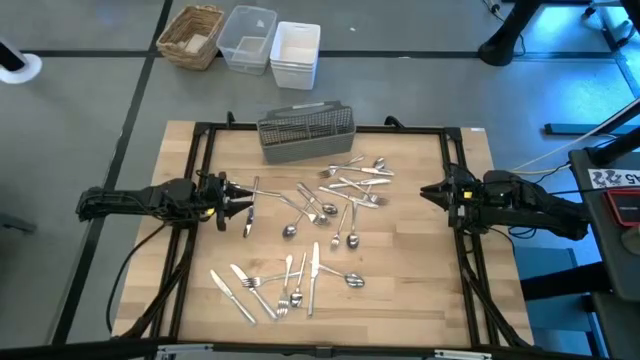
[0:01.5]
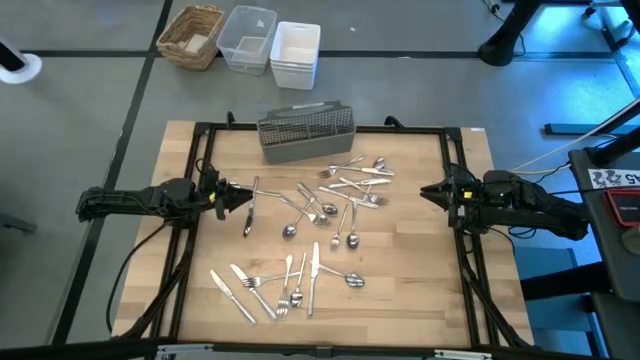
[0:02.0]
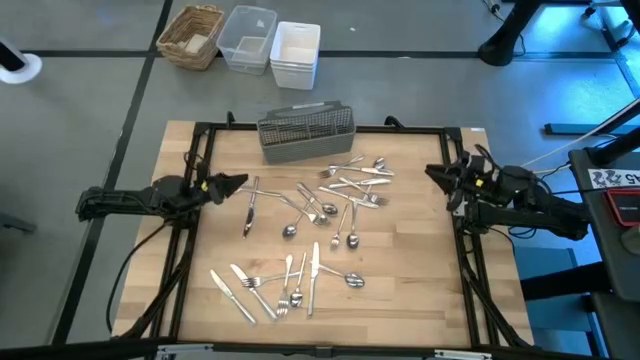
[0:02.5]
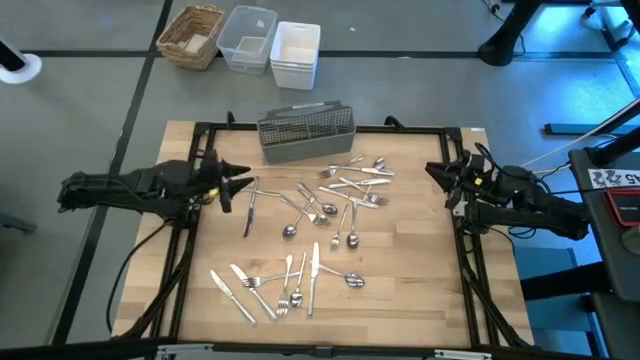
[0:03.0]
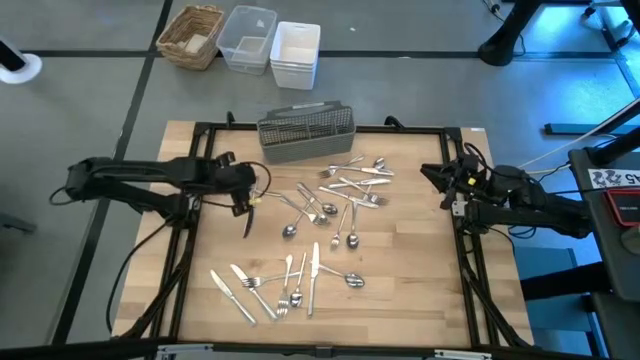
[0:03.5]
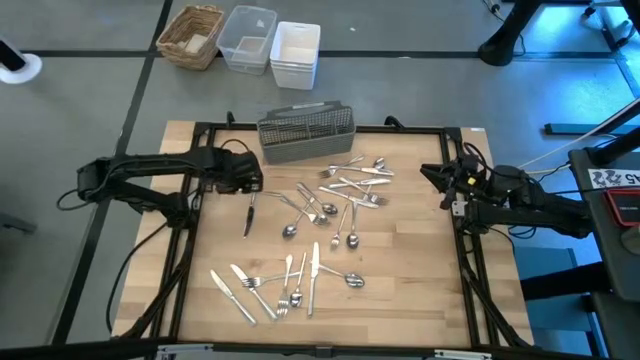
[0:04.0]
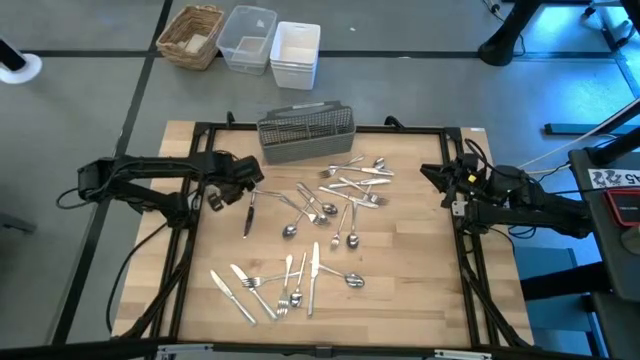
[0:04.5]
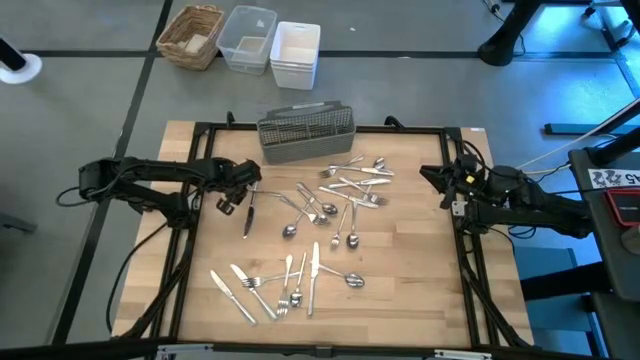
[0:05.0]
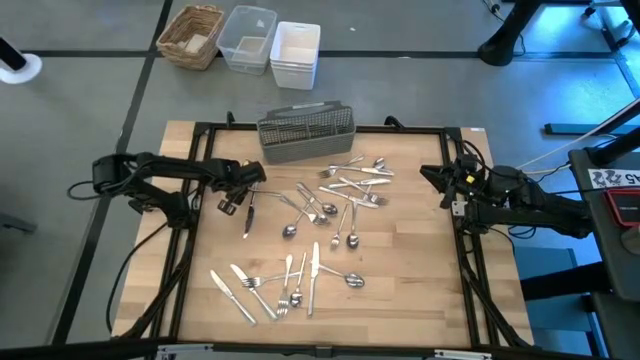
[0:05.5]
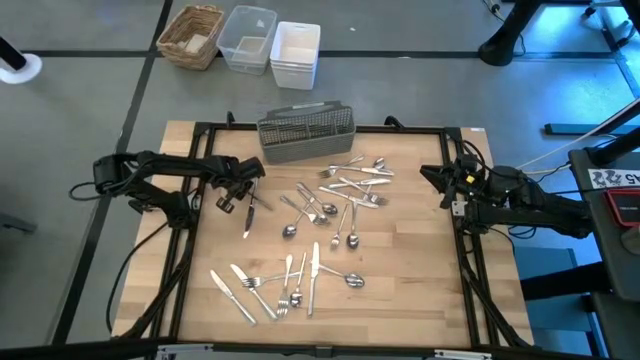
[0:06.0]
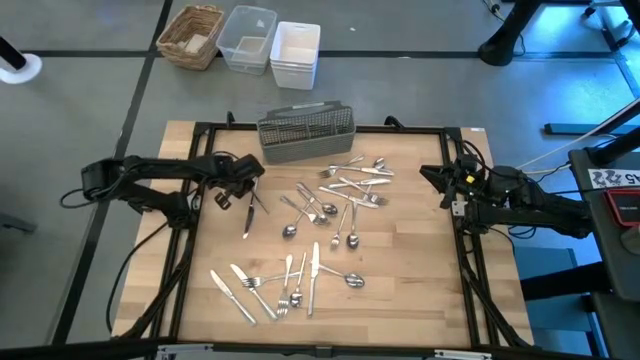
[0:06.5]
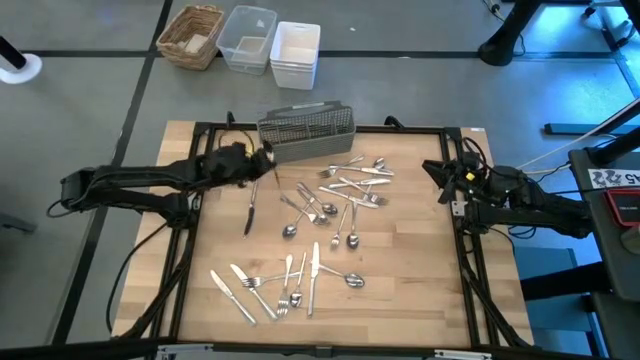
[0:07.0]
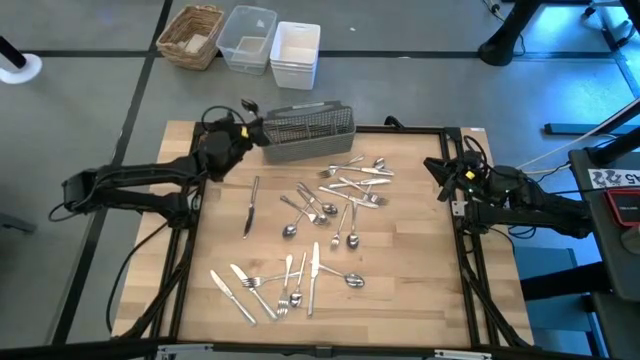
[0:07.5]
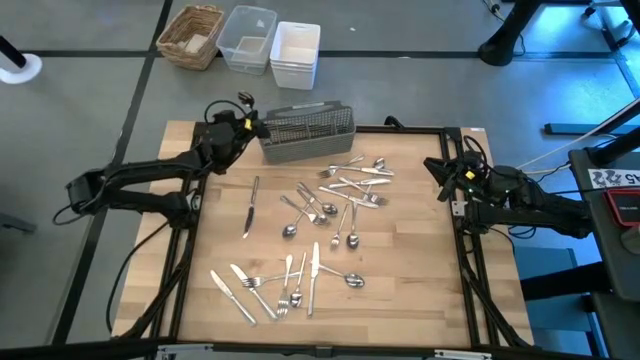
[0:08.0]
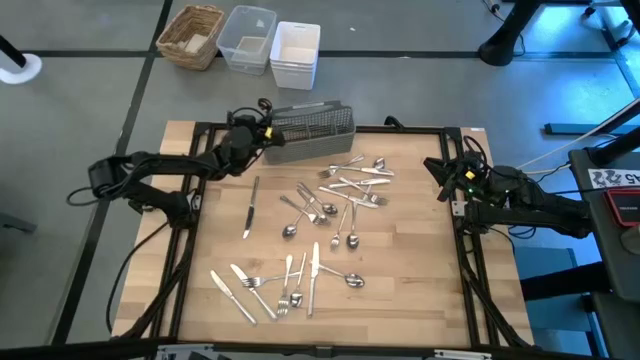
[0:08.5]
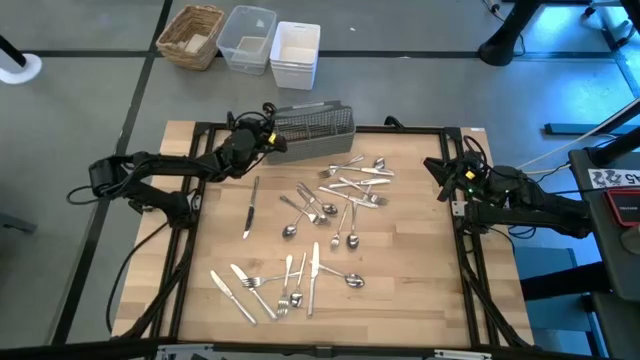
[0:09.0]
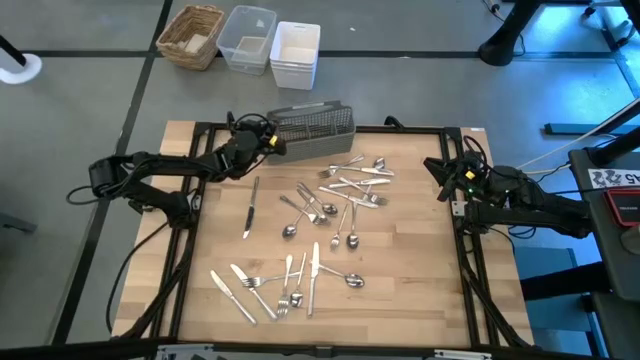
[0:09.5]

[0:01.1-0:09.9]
Task: Sort silverware
Put the silver spoon into the silverware rack

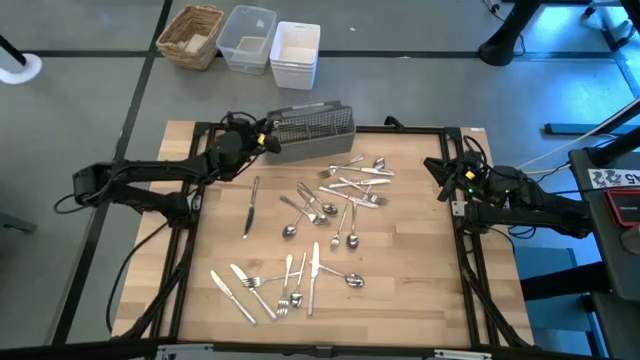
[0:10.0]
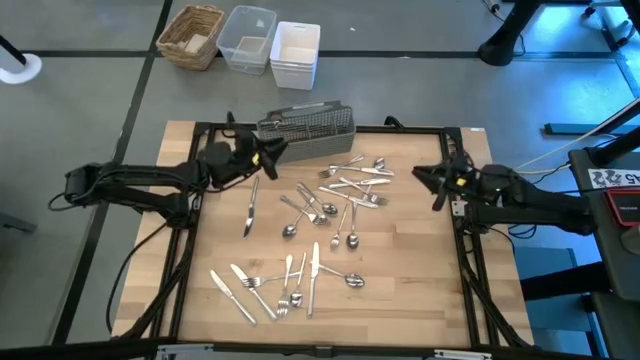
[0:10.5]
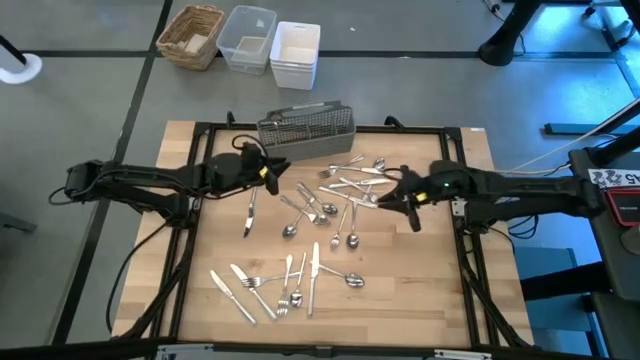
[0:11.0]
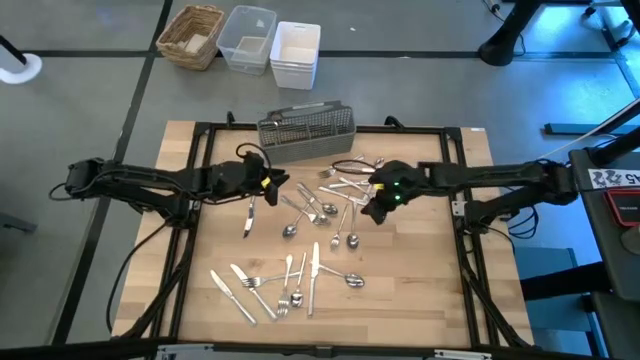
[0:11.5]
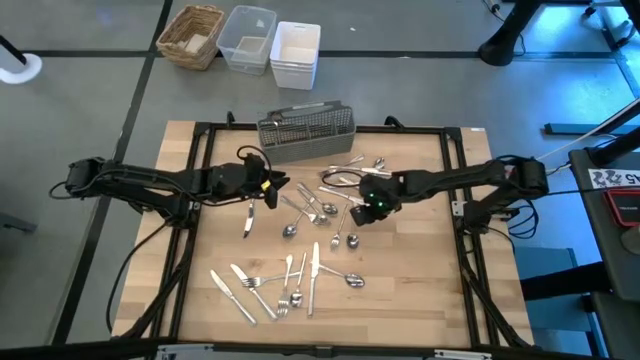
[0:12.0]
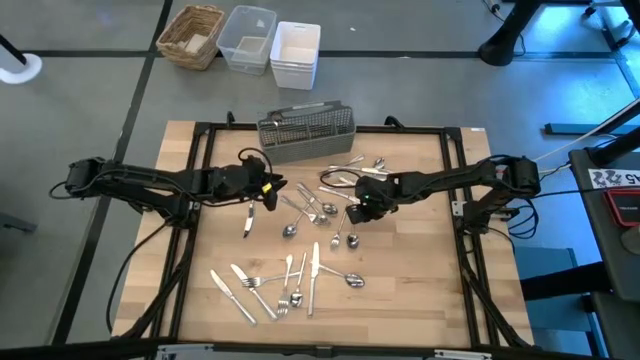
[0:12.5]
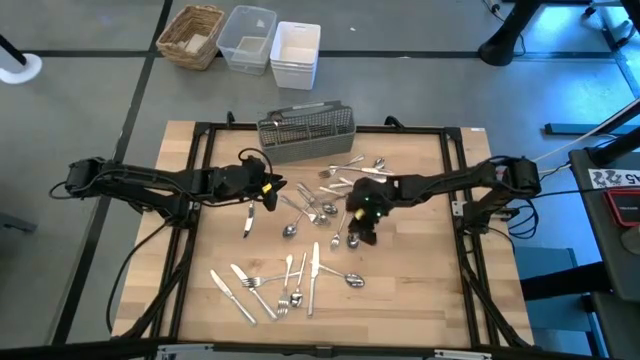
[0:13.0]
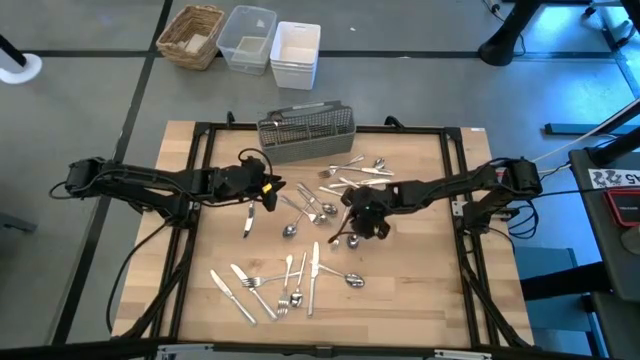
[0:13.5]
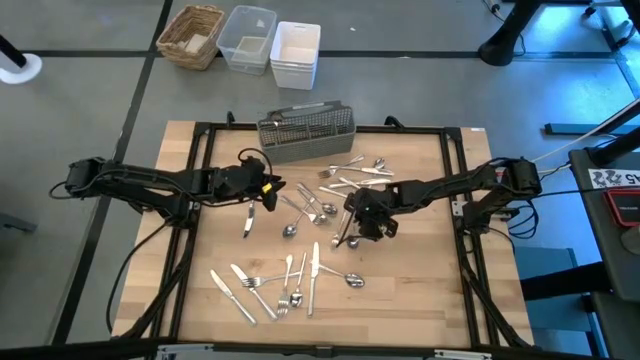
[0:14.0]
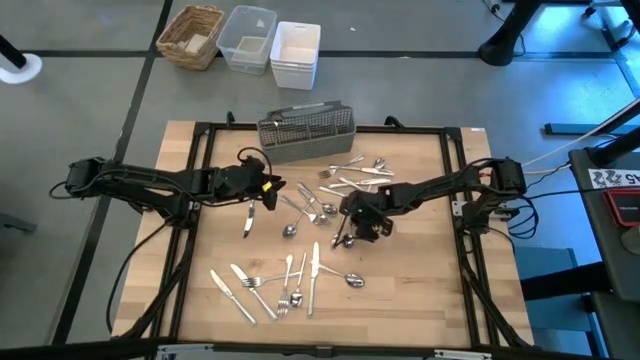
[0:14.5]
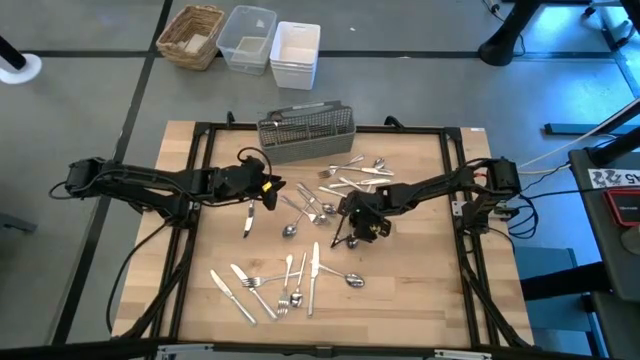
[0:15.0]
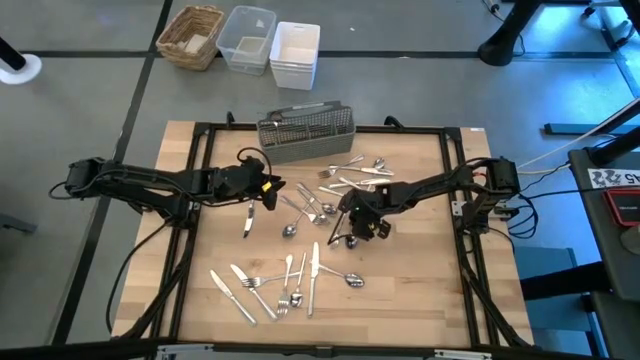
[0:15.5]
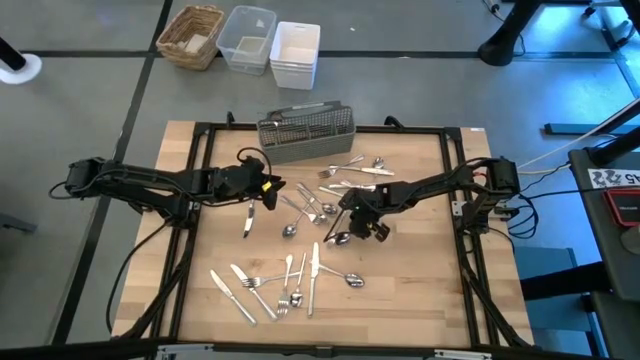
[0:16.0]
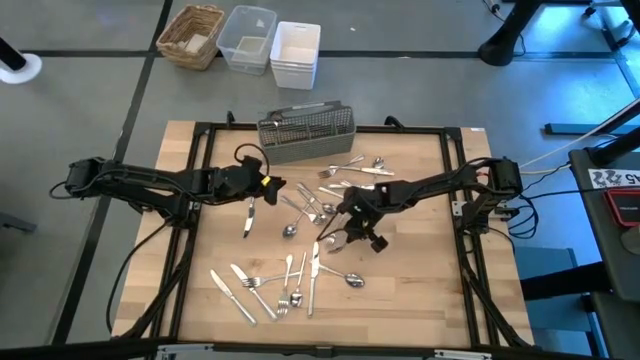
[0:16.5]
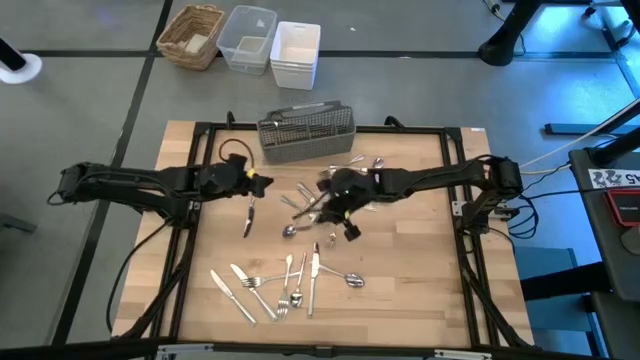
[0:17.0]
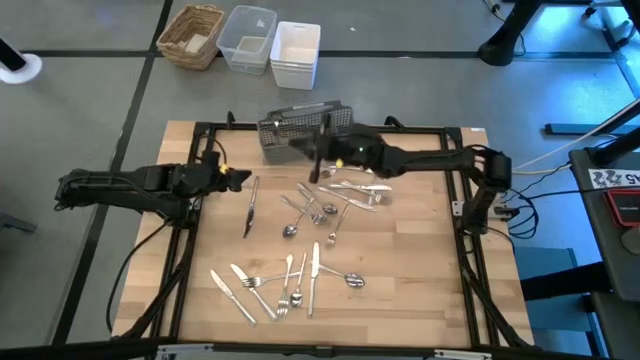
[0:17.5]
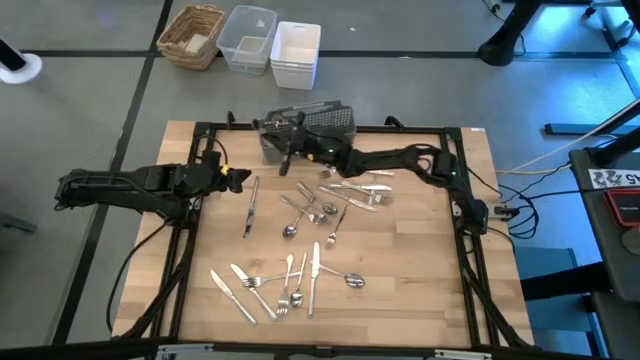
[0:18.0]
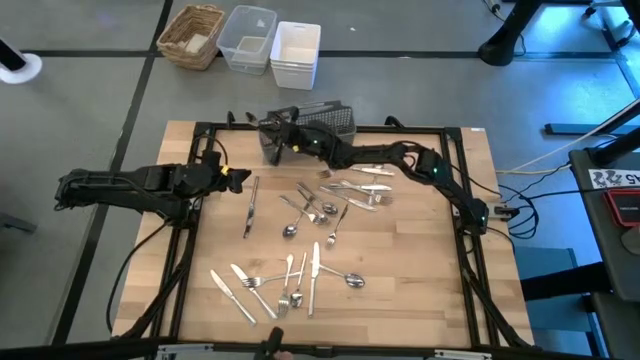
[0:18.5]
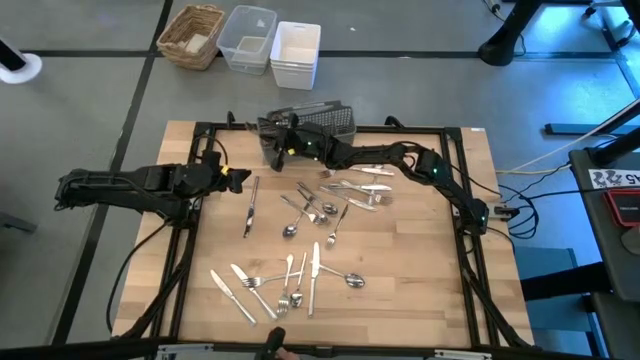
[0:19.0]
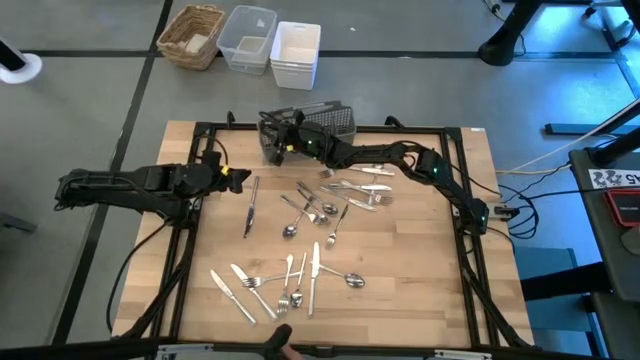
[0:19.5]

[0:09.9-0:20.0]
Put the silver spoon into the silverware rack

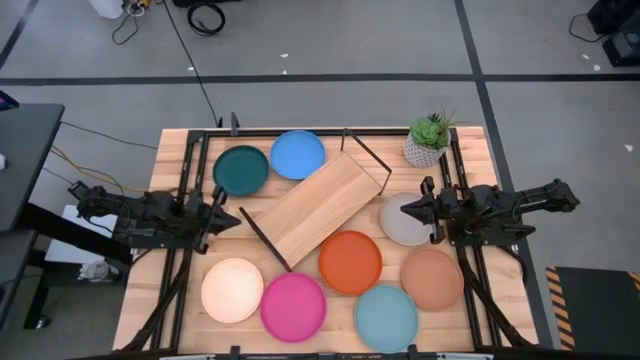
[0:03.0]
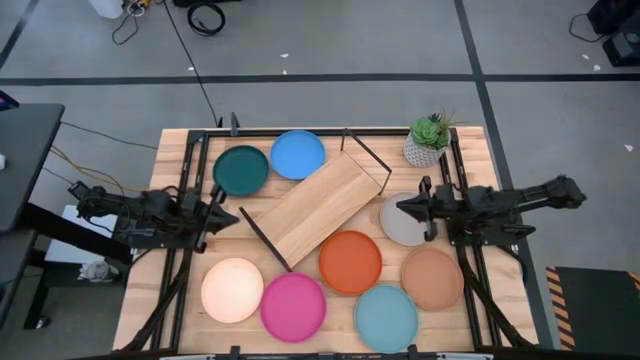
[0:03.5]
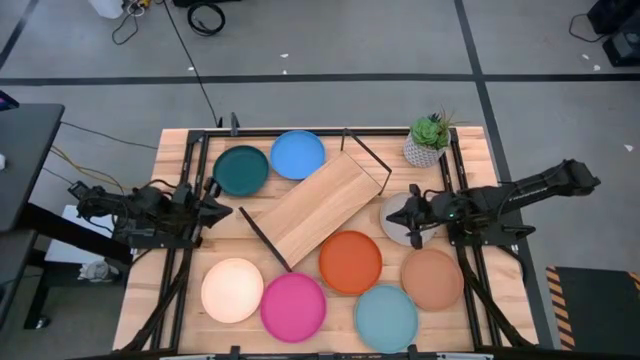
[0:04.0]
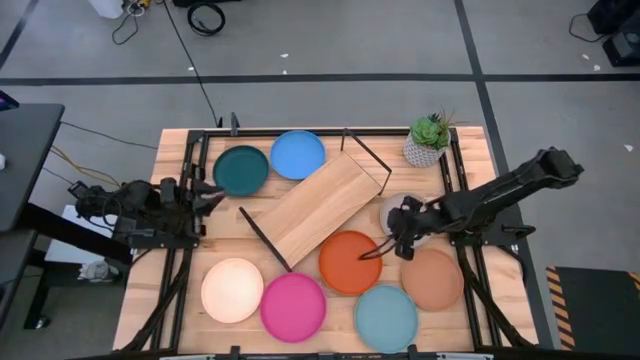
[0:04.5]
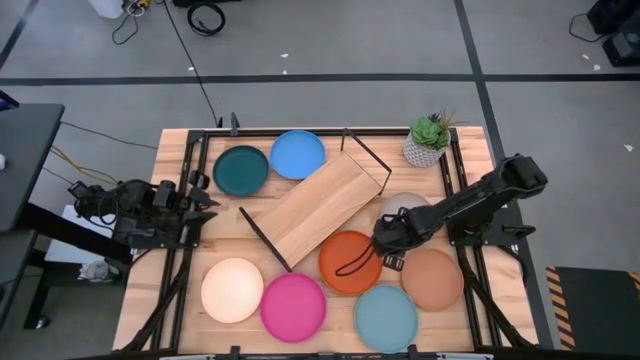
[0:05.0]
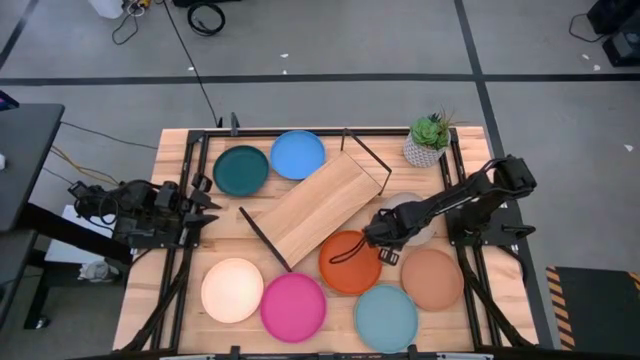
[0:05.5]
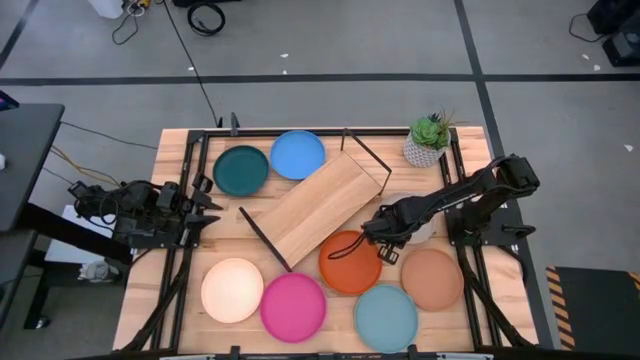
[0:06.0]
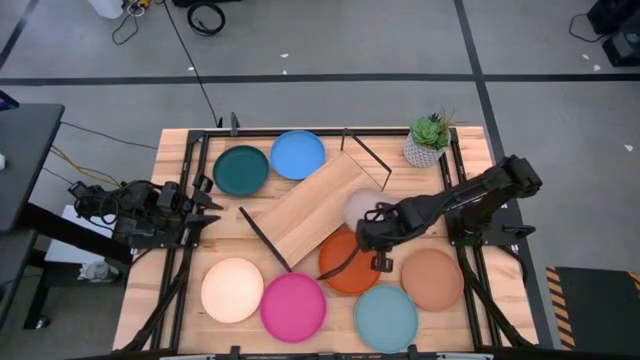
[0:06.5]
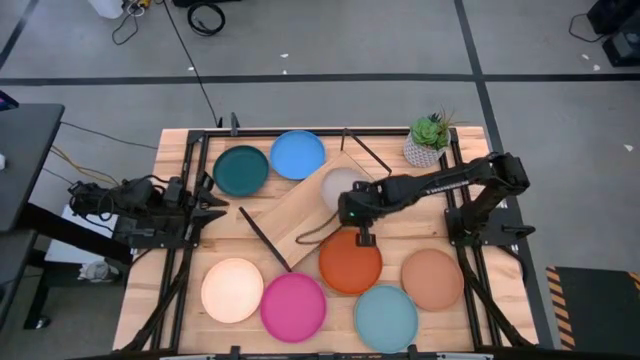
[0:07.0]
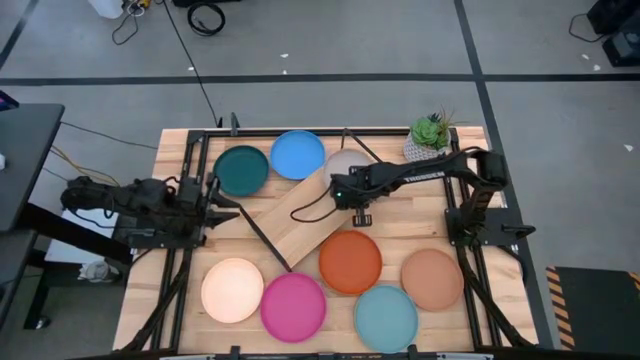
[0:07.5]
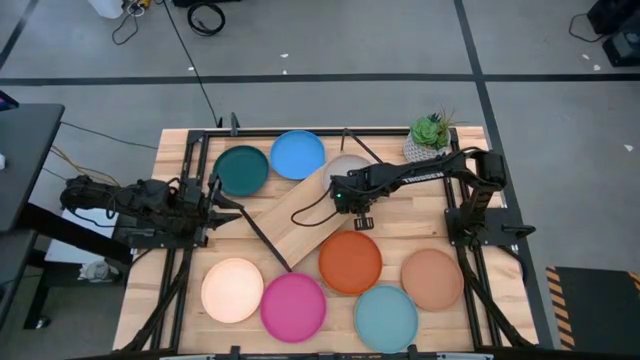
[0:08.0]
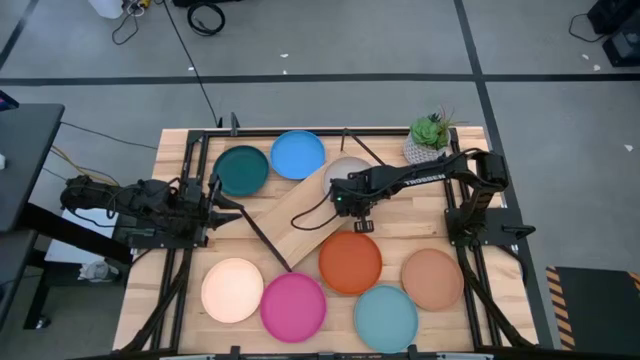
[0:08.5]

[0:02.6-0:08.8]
Task: Place and stack plates onto a shelf
Put the gray plate on the shelf
